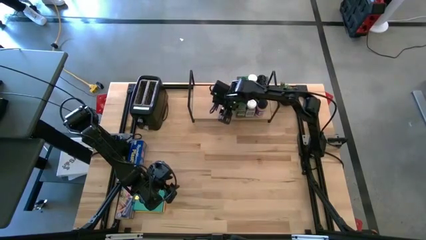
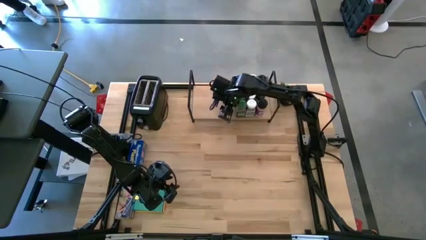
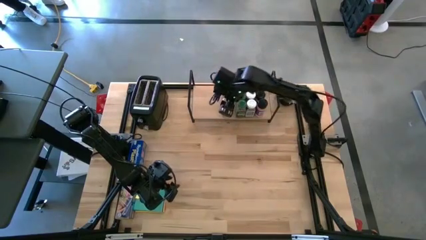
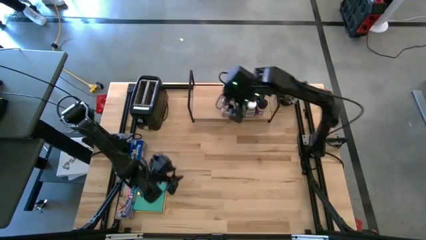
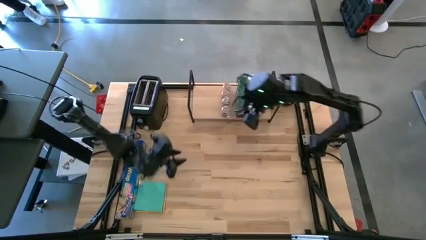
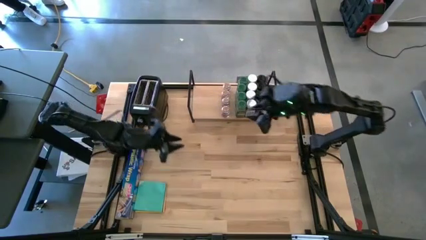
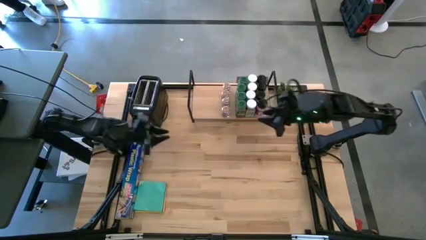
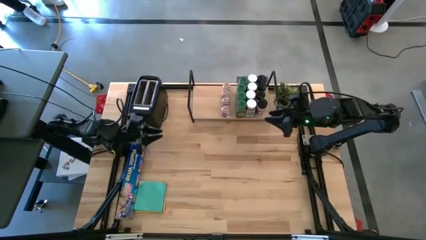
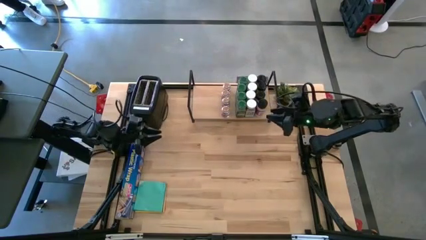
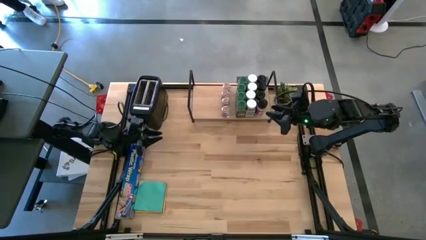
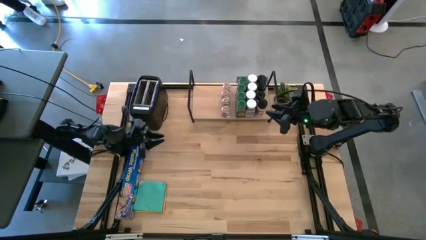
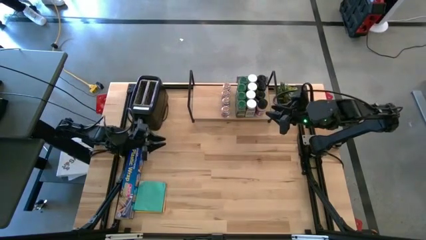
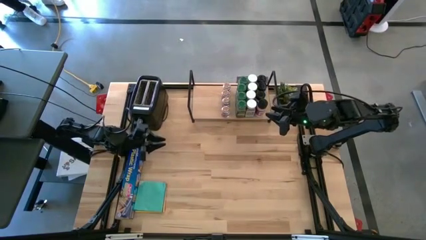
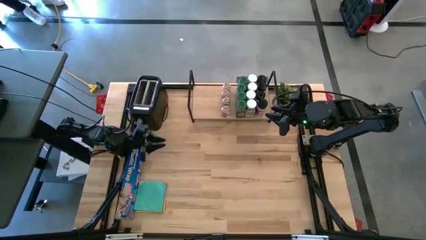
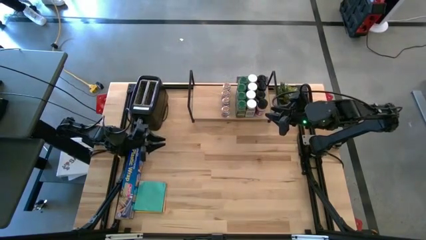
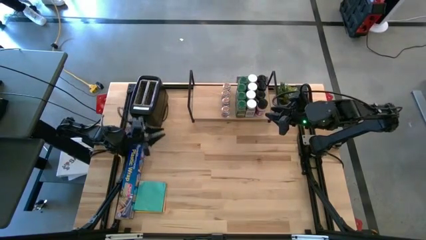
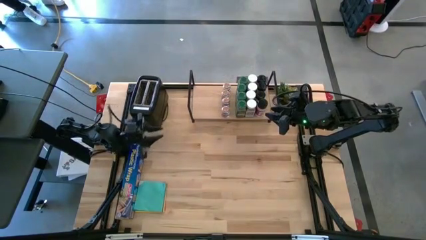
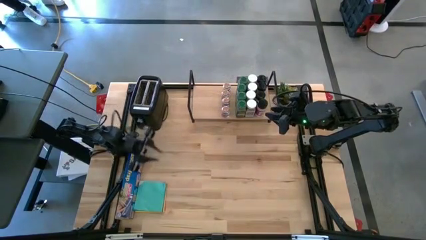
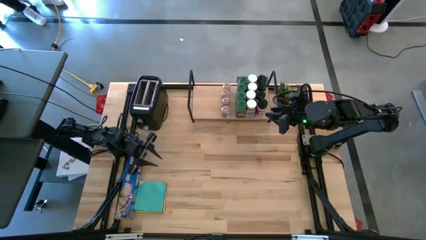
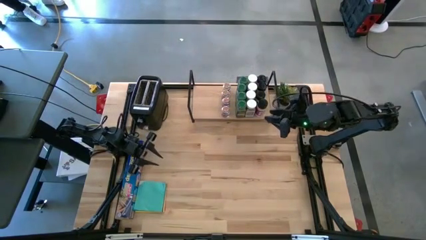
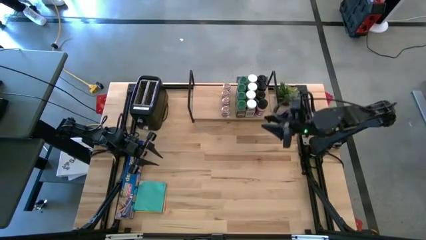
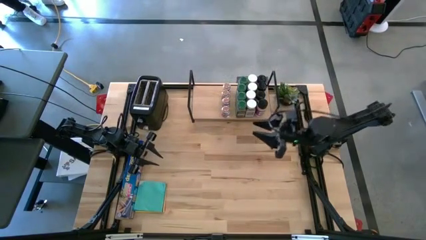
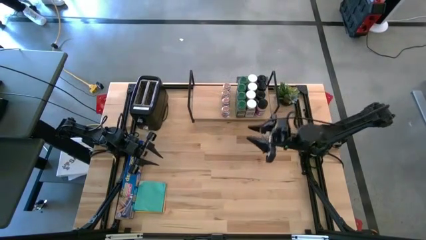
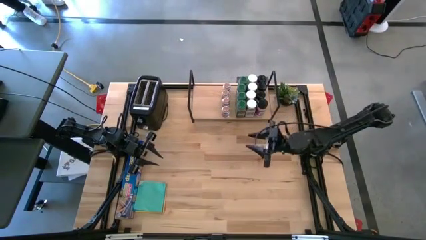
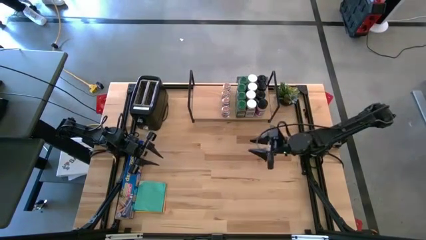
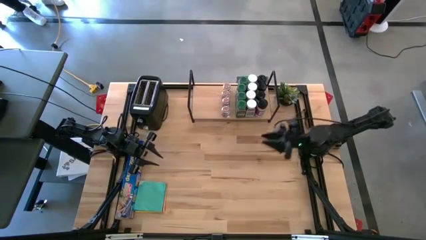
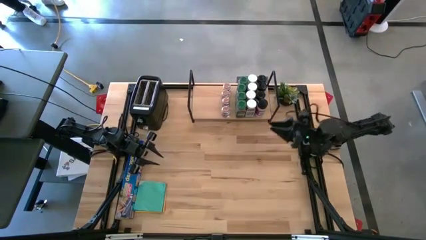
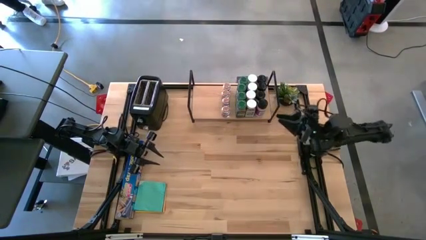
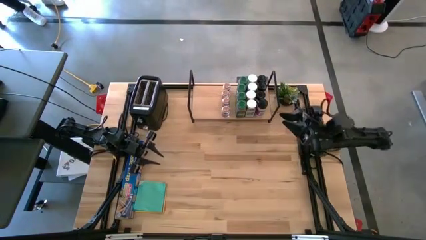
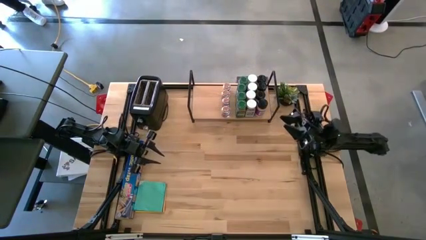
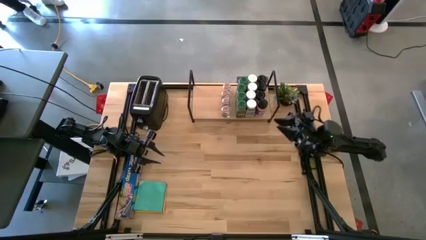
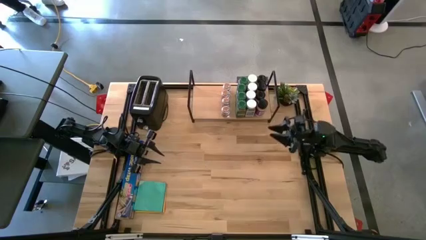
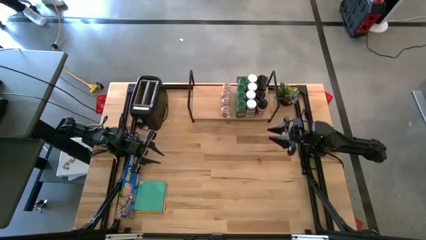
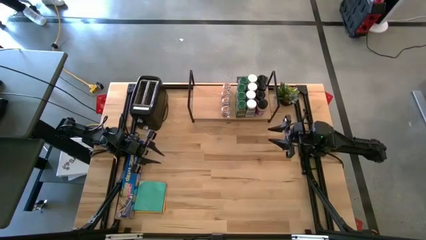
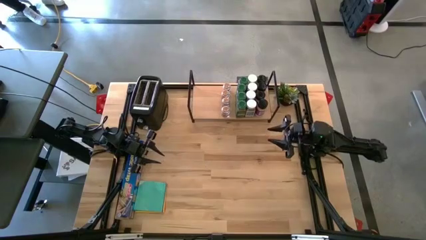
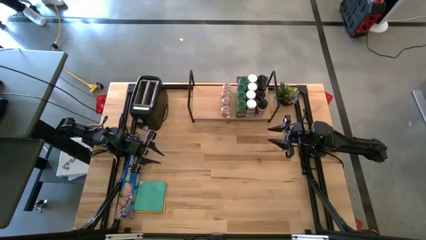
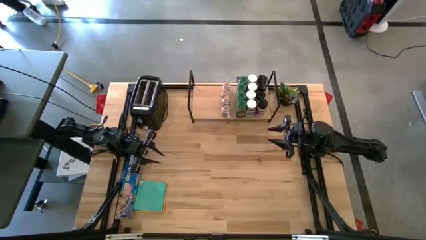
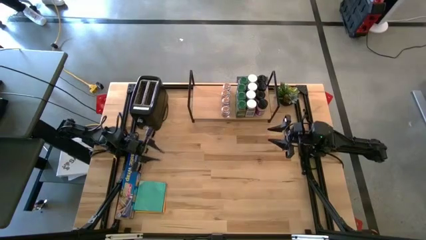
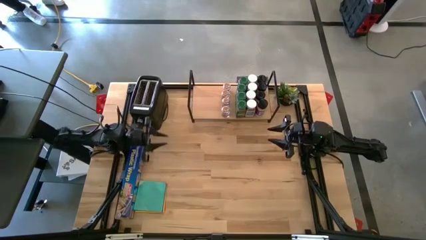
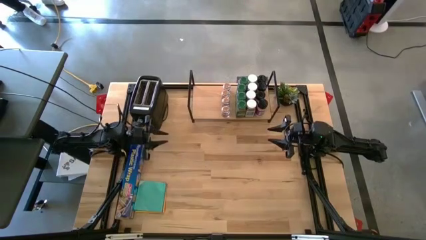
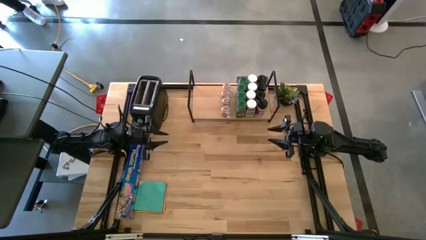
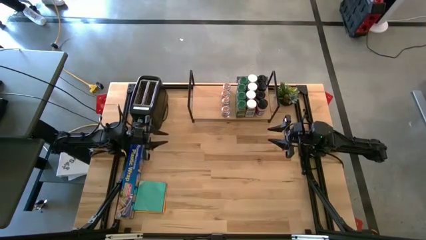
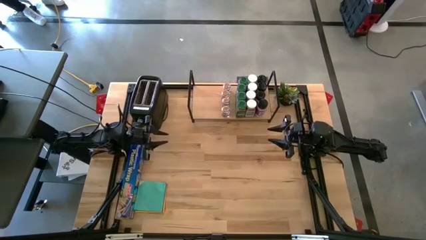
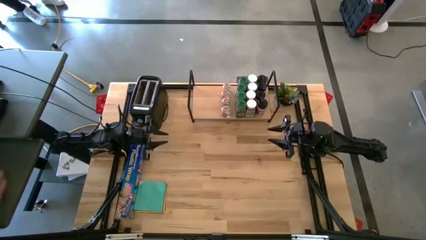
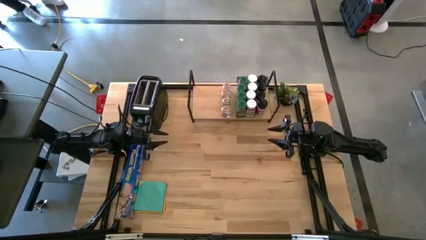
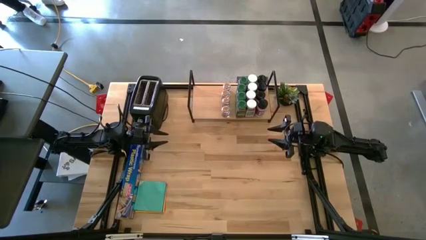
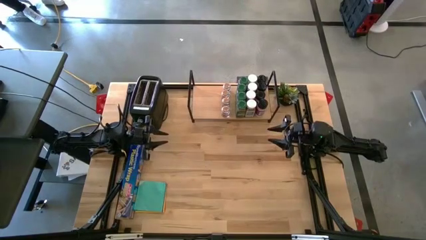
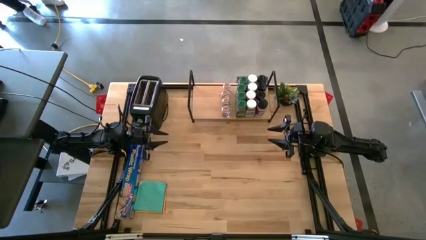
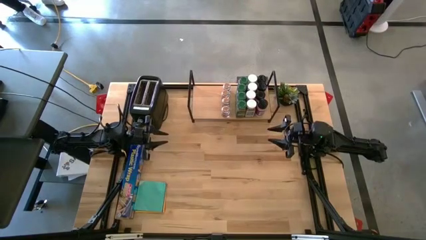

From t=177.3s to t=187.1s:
Task: Shelf spices
Return to Home Position

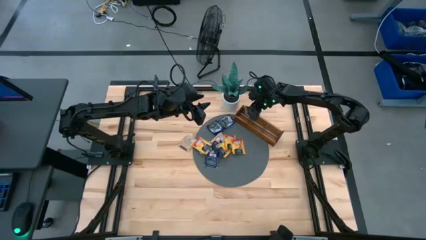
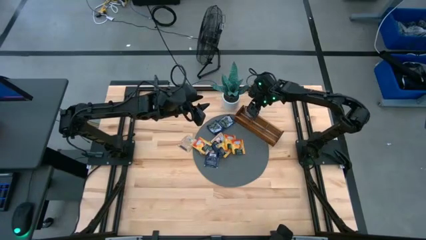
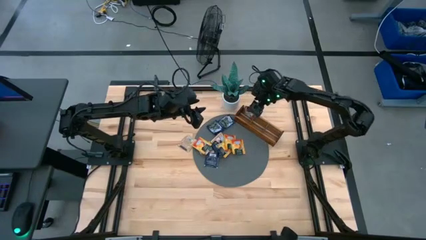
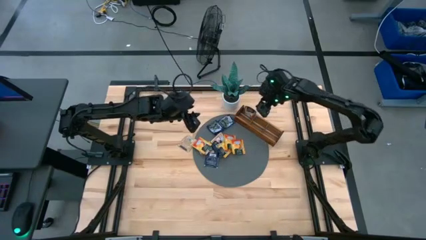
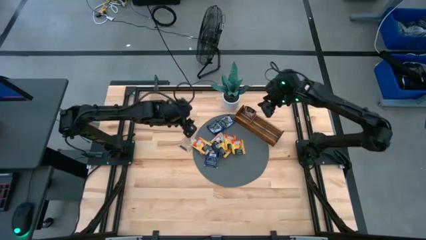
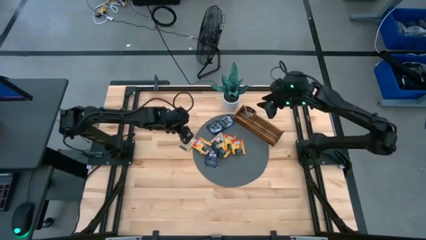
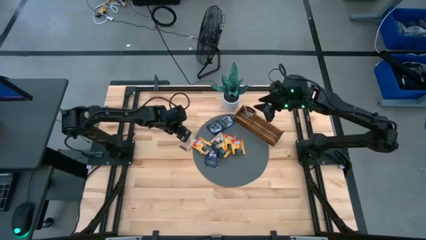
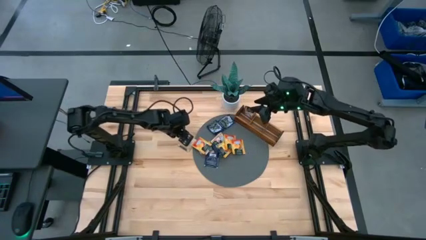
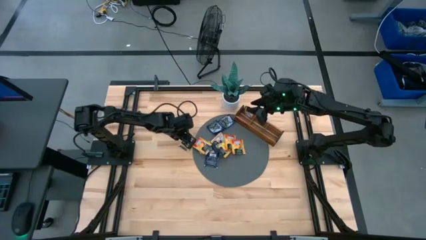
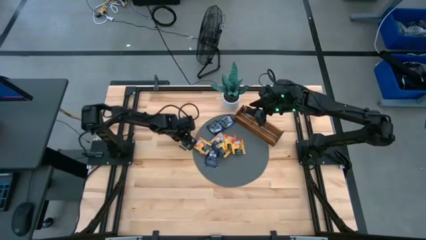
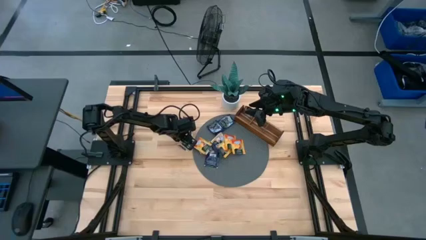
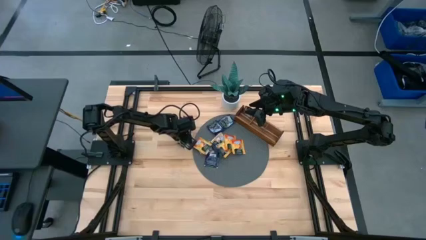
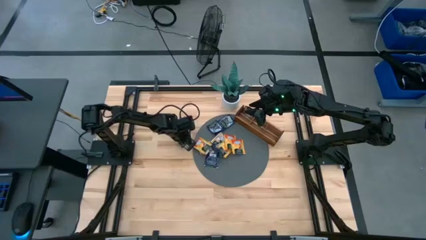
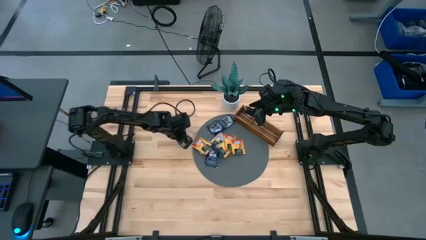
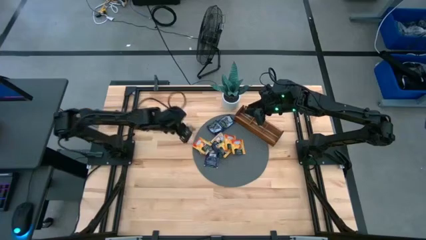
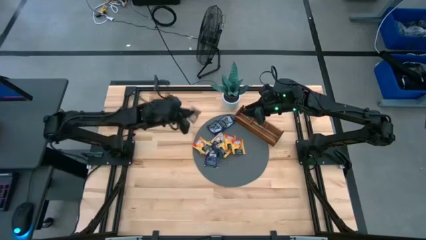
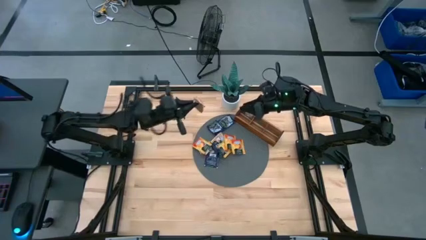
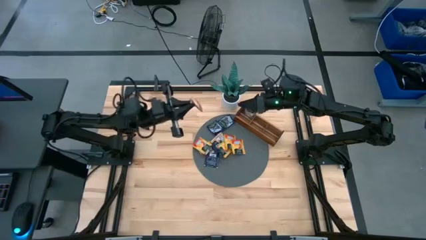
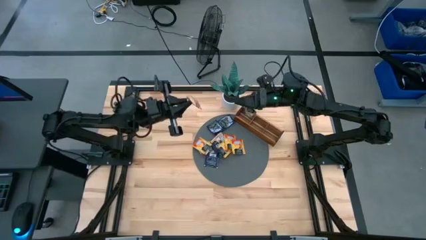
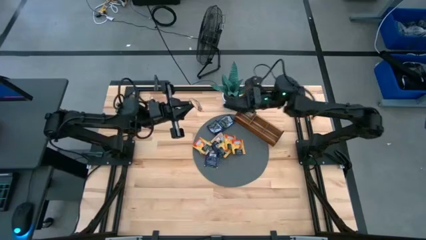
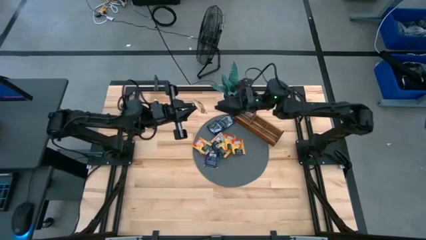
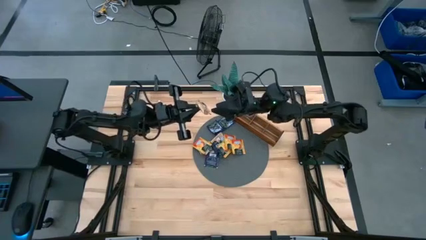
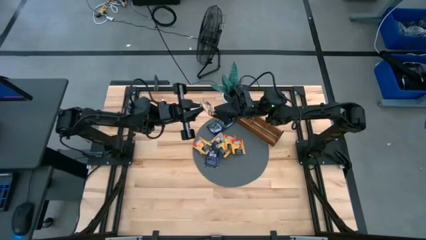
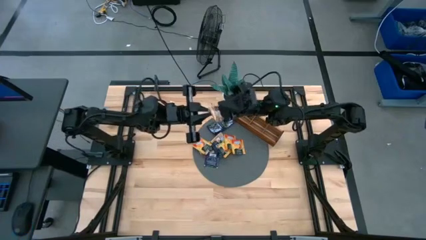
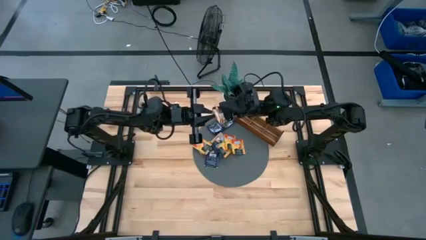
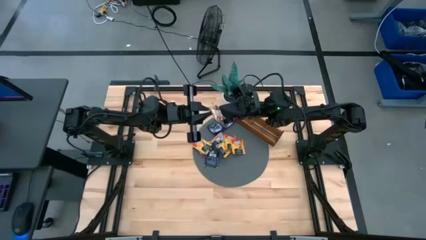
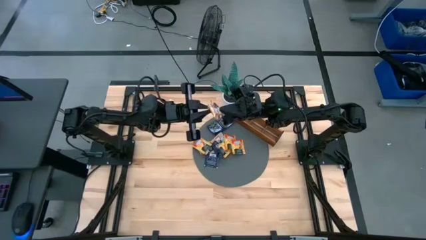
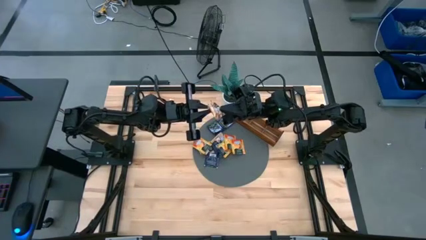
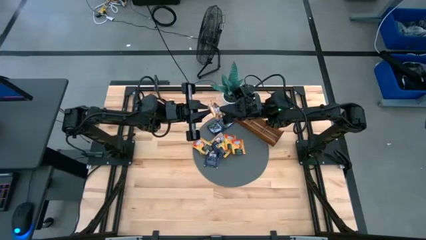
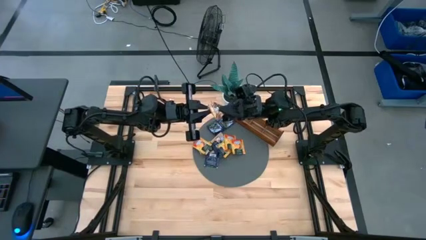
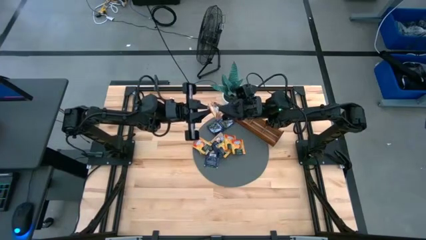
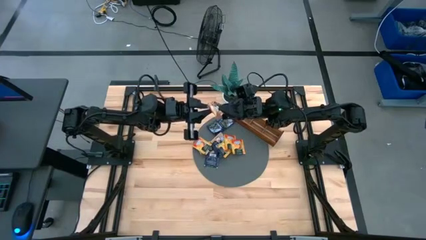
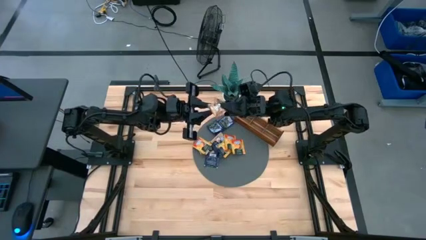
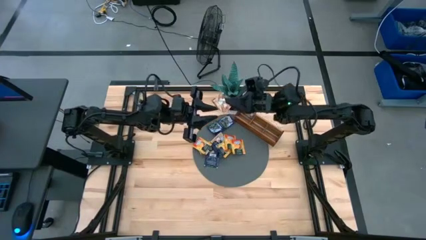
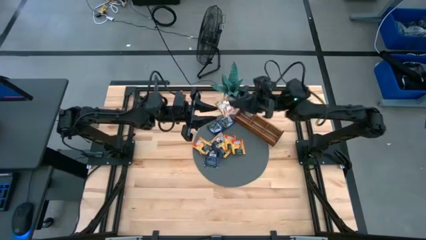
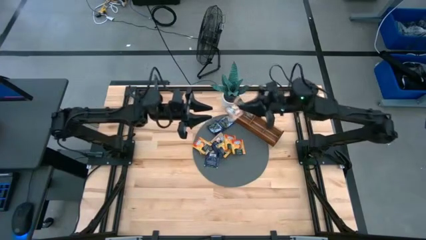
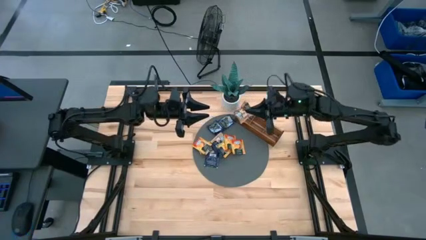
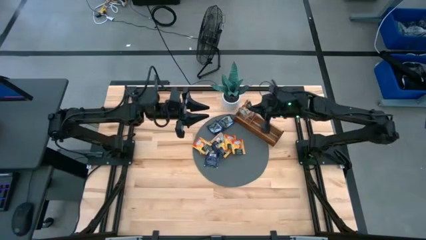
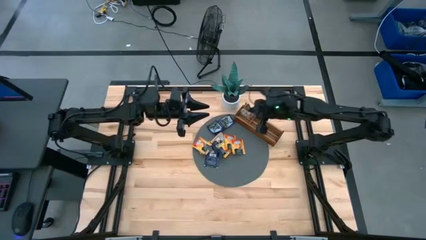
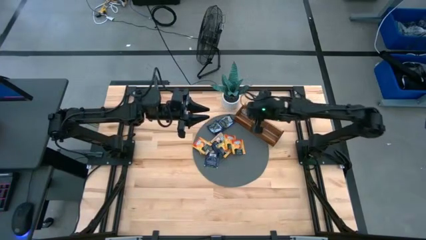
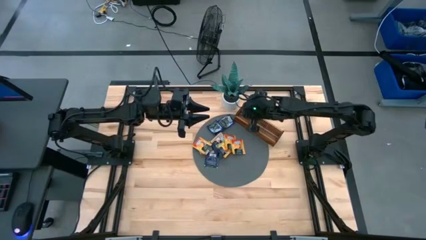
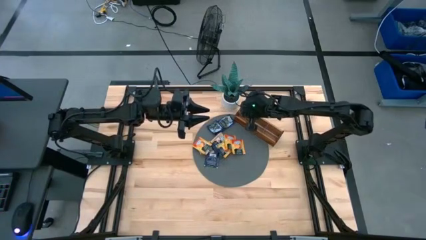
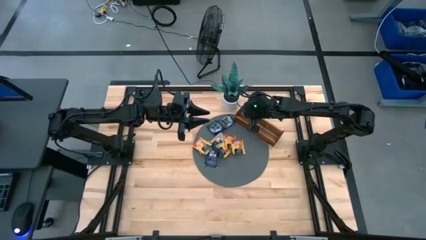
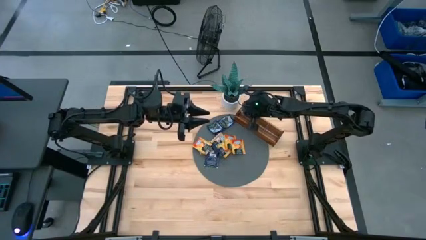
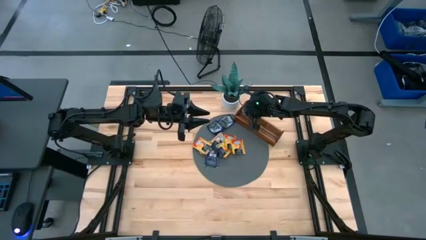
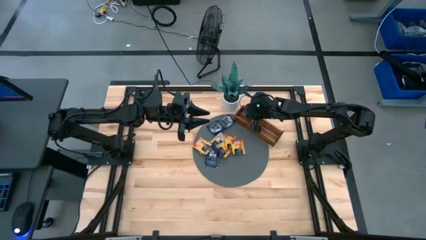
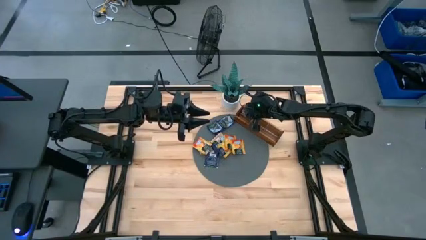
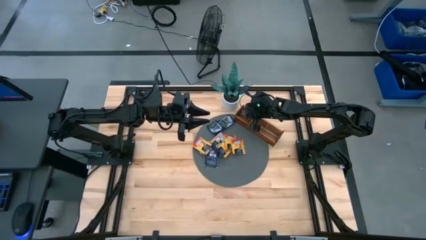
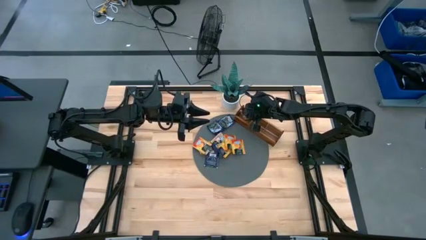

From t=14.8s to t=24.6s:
Task: Pick & Place Tea
Put the brown tea tag into the wooden organizer
